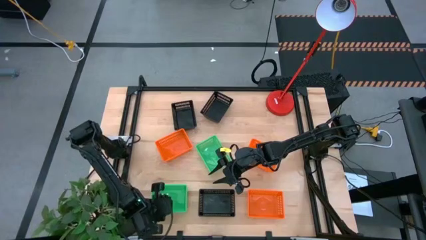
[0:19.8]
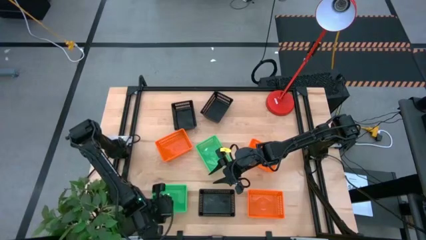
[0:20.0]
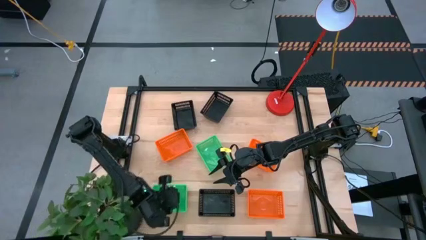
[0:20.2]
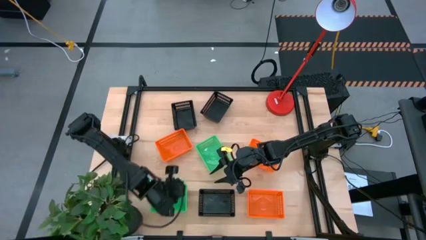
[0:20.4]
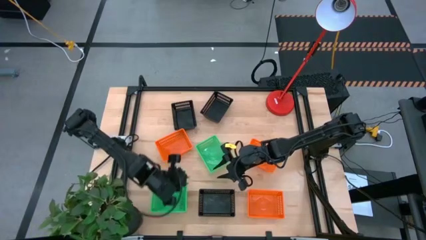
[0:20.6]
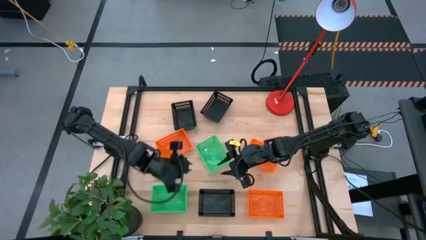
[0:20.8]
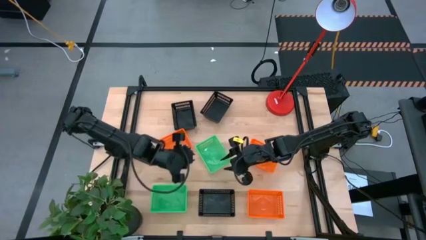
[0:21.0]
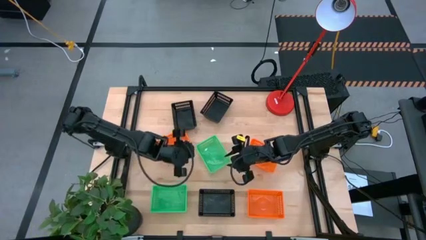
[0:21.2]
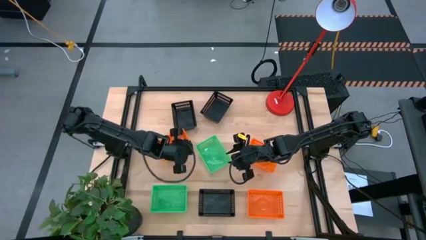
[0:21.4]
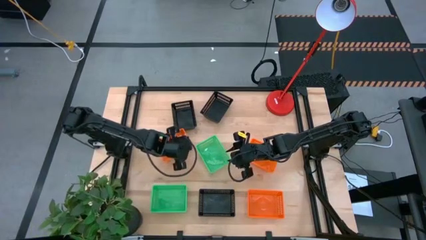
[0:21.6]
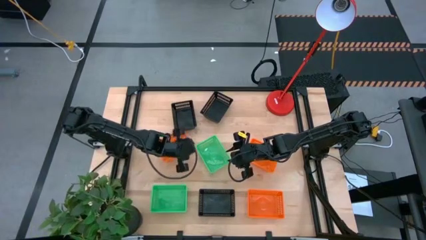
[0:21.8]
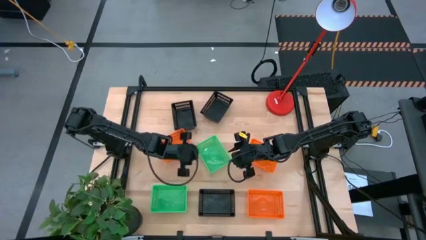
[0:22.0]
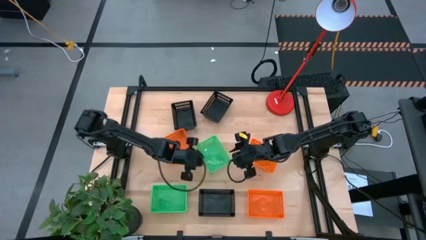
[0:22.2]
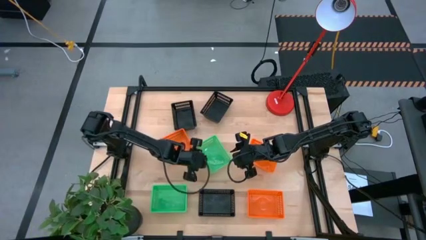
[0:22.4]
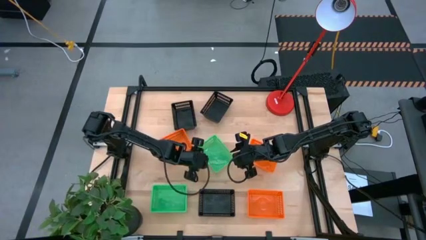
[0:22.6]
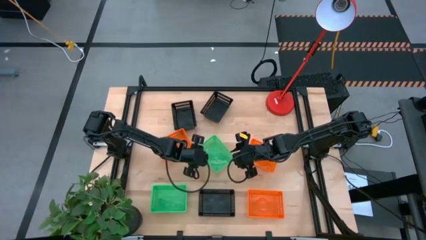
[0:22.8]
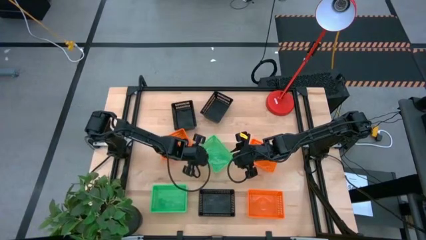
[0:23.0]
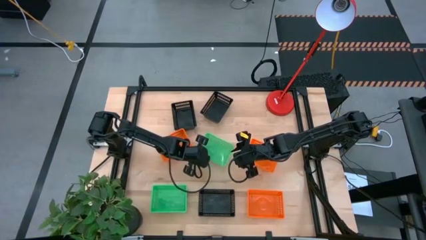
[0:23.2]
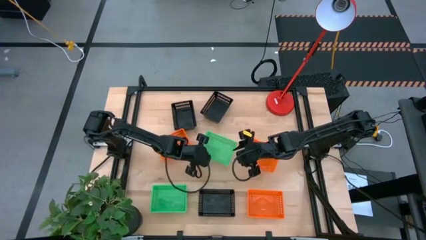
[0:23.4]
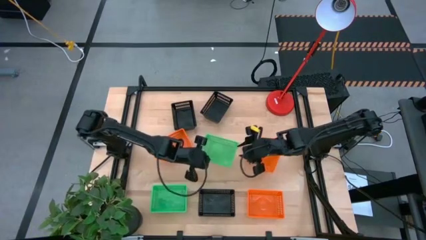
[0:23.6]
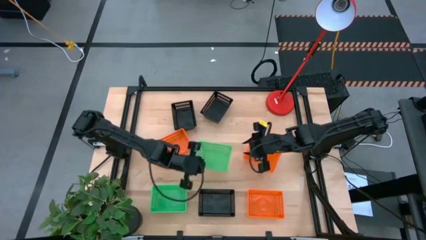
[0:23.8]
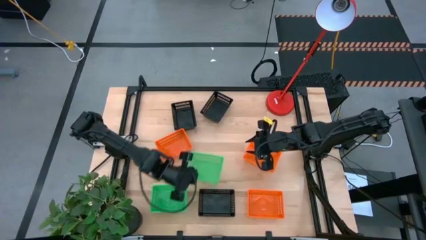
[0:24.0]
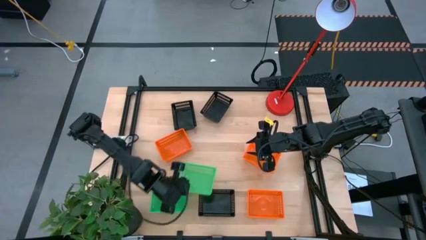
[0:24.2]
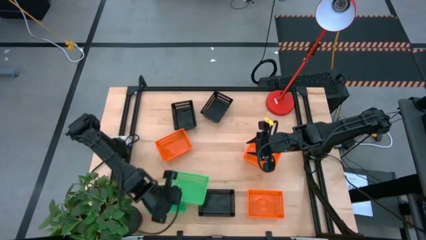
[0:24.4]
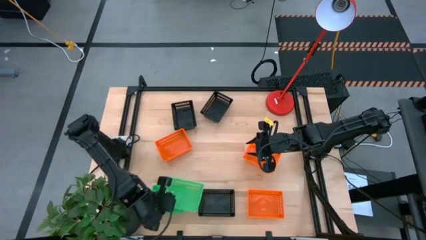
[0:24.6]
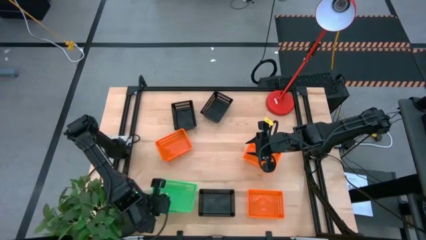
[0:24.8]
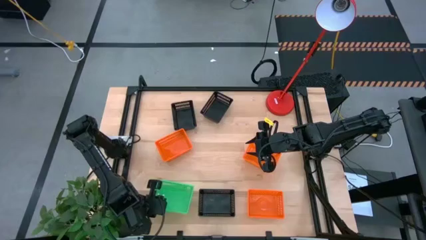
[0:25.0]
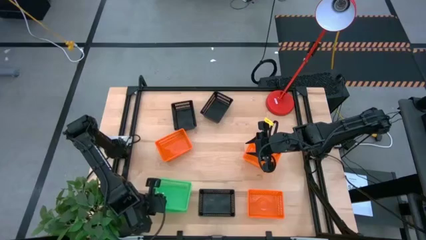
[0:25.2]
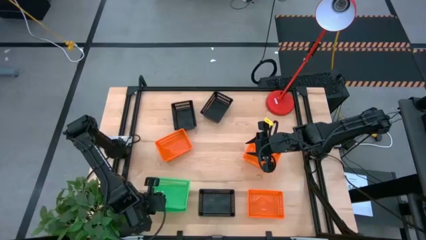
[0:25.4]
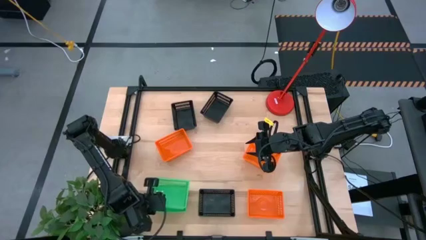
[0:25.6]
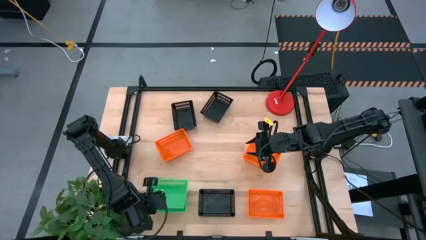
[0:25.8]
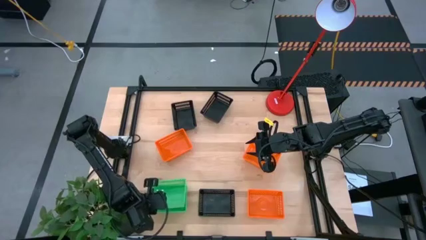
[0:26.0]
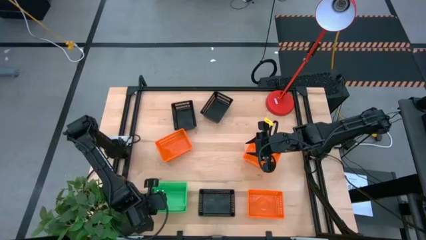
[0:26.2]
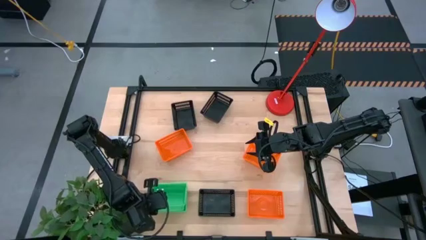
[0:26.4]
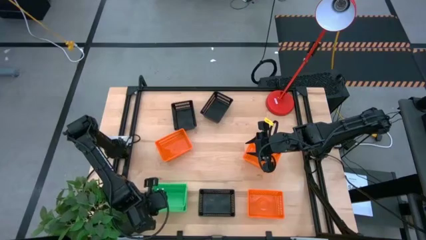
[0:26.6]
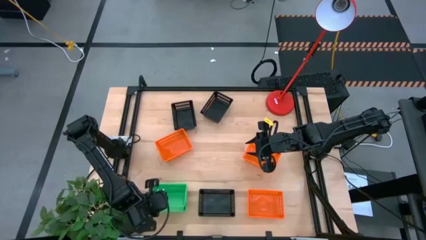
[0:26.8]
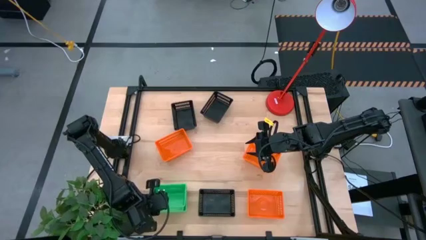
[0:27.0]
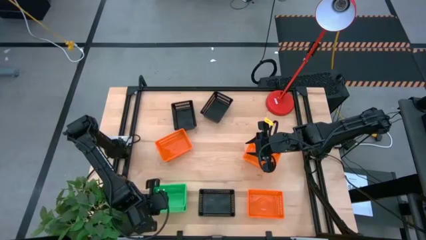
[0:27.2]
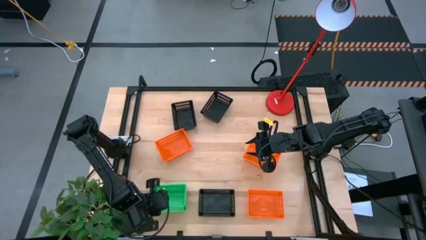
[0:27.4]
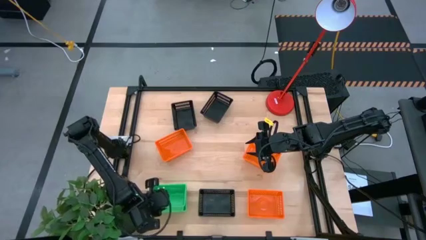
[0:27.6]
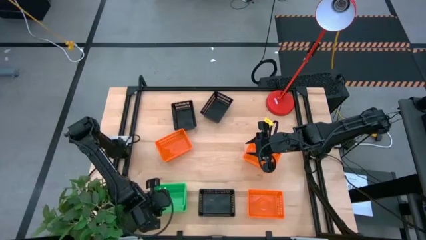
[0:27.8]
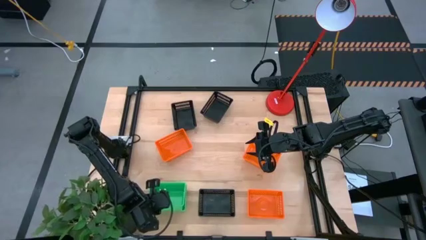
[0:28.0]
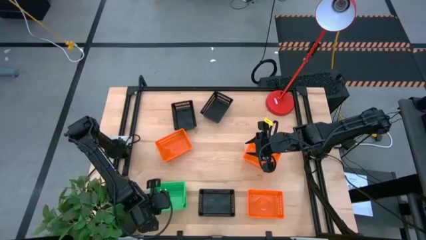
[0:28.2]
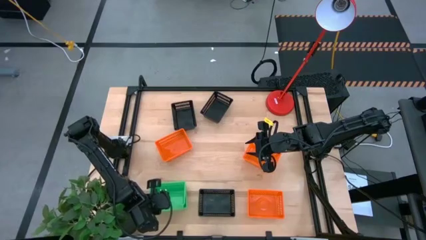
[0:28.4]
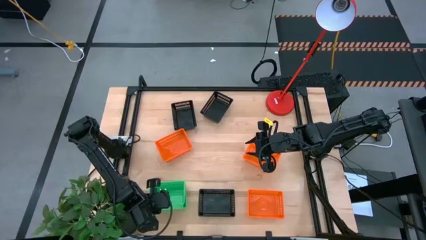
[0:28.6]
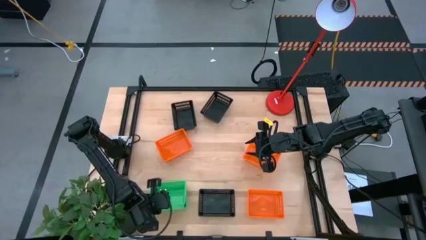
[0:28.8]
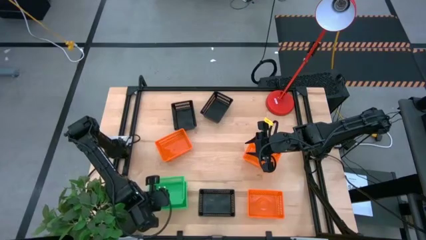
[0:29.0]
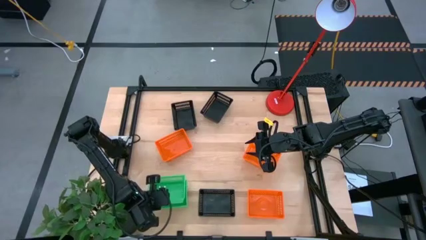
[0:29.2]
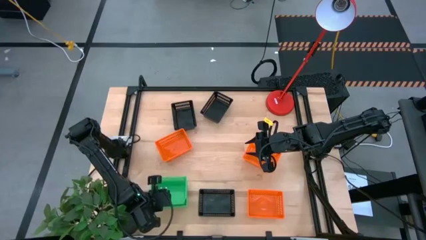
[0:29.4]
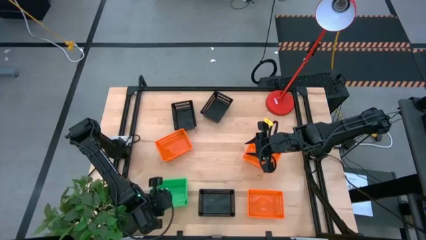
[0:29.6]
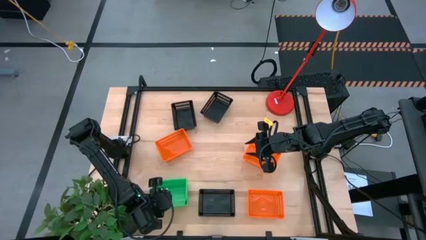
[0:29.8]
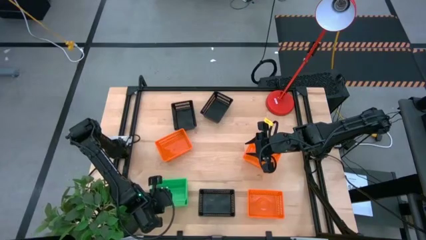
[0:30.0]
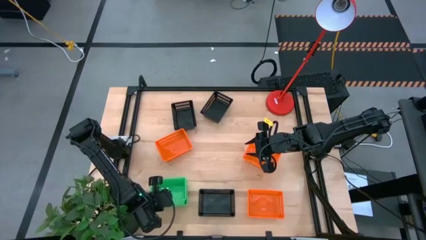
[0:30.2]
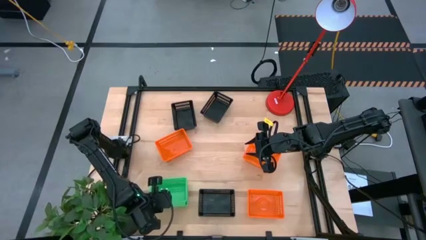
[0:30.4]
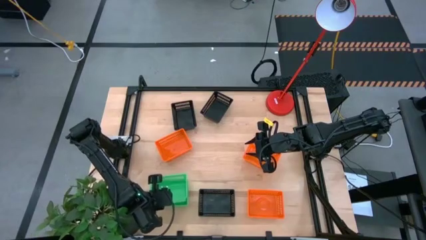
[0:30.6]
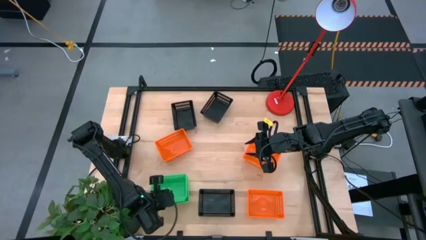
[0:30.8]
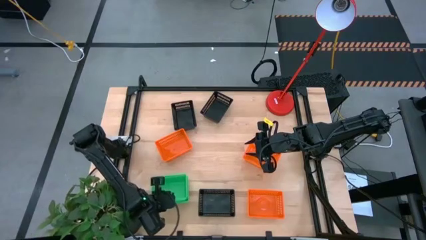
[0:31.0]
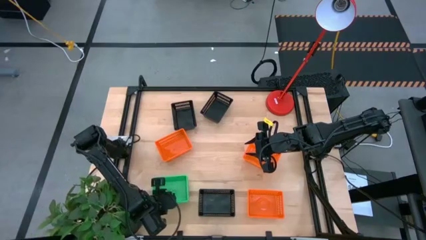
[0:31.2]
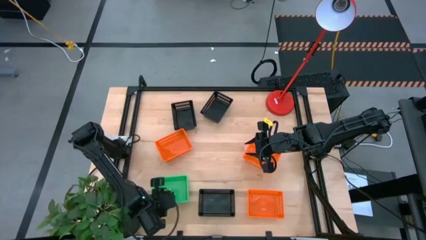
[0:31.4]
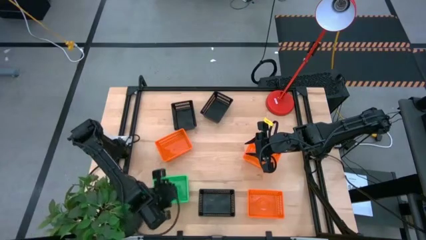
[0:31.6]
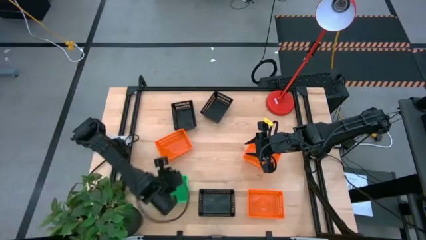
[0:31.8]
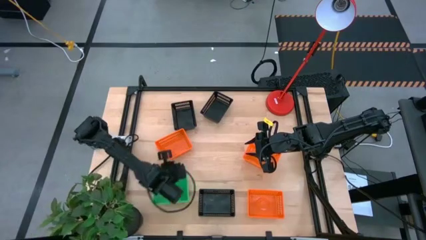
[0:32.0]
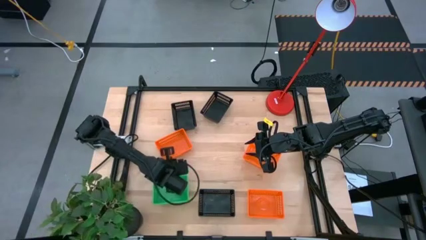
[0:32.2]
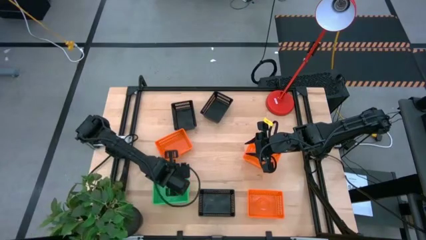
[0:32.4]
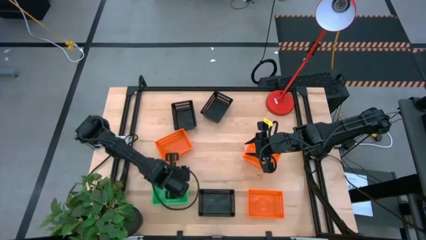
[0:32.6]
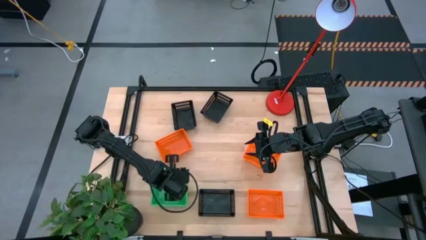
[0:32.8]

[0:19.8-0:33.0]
Stack the top green bin on top of the bottom green bin

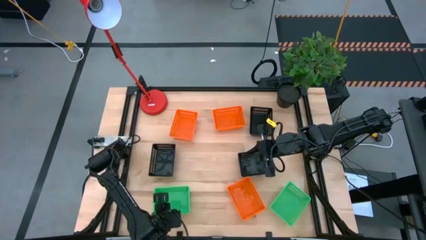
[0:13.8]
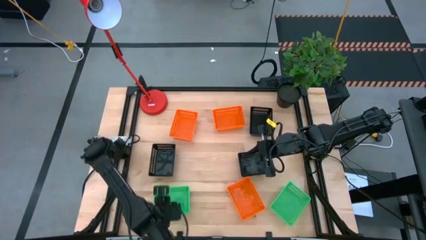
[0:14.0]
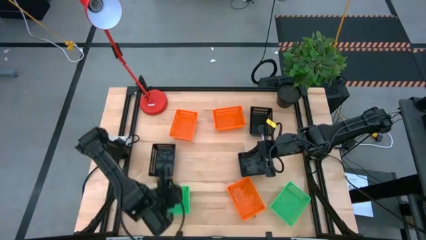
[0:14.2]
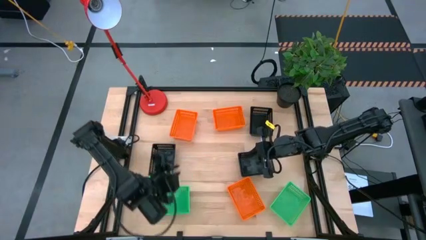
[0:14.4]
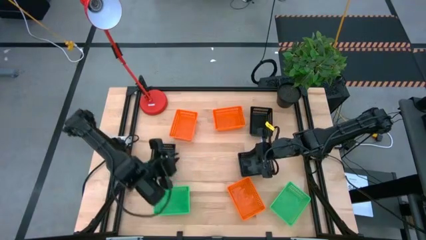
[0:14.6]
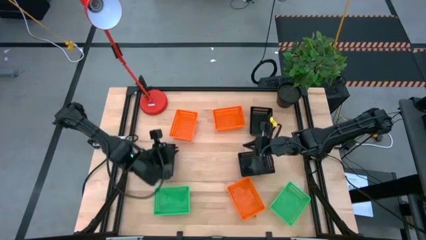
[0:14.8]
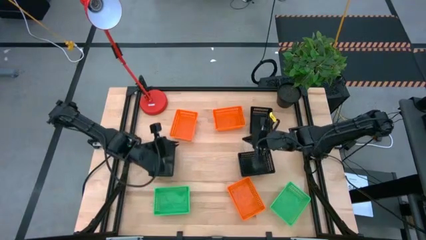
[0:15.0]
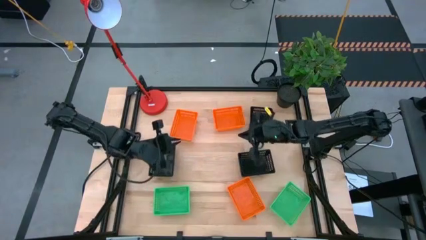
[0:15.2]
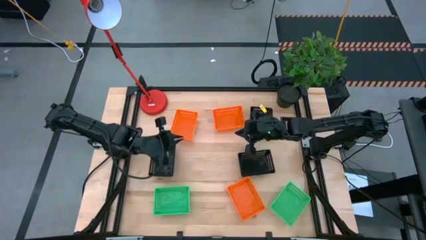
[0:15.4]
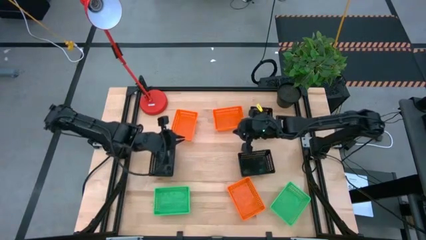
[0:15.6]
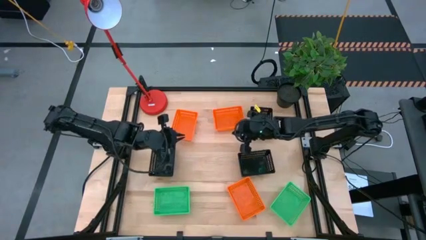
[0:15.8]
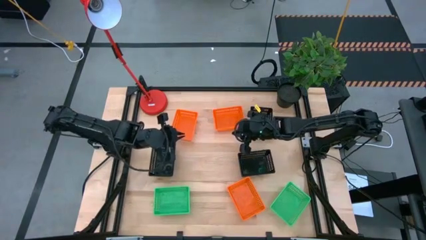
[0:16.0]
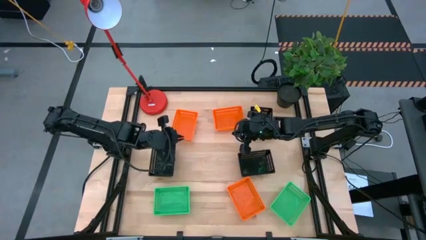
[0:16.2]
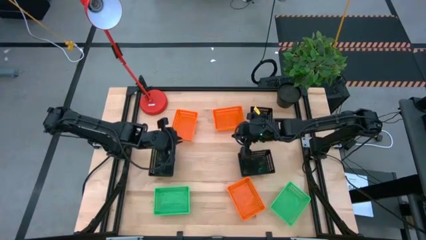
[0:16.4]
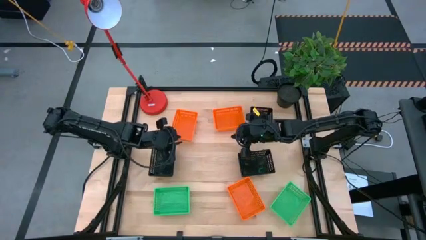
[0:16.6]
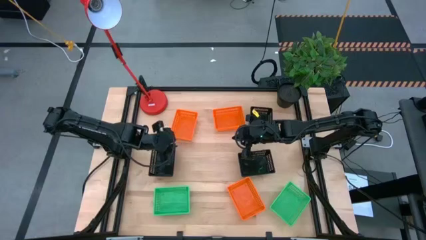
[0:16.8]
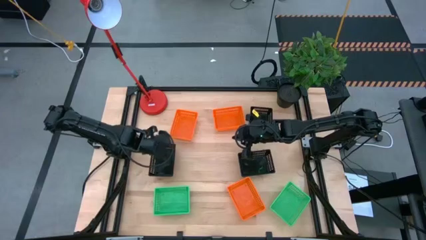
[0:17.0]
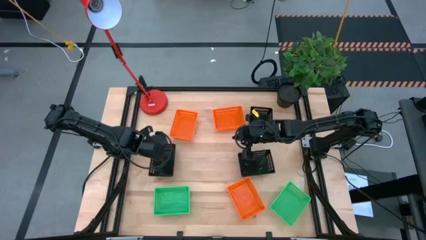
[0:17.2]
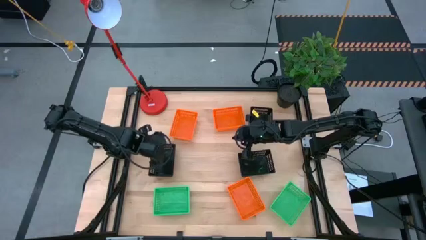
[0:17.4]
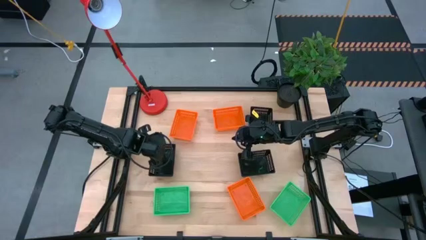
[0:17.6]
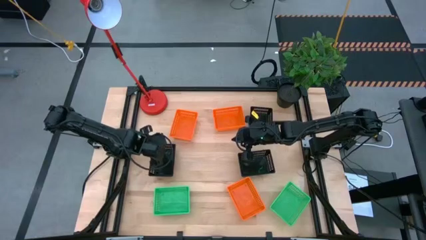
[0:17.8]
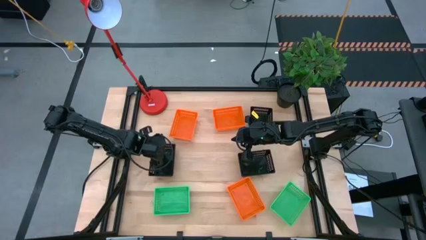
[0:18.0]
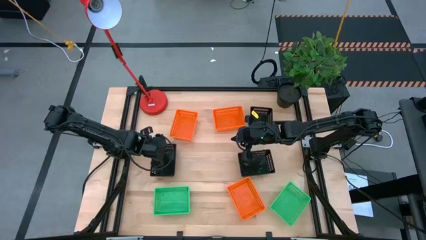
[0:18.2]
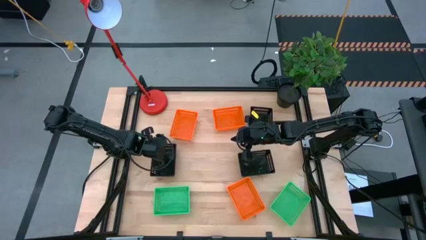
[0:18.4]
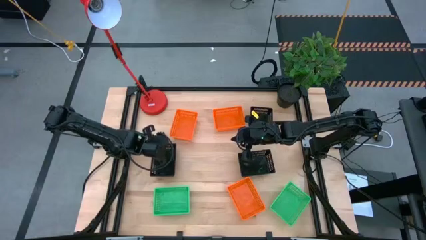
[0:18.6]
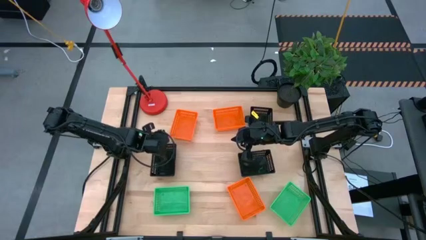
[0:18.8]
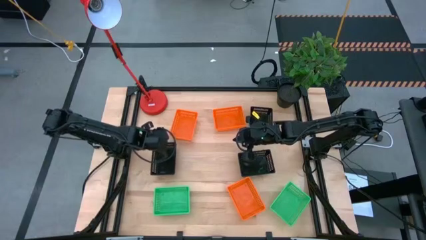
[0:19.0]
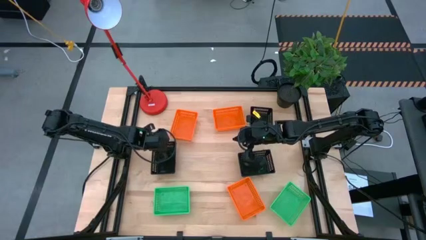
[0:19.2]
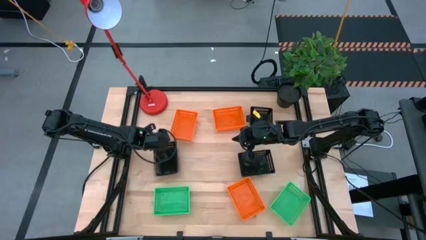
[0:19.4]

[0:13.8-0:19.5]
Stack the bottom left black basket on top of the top black basket
